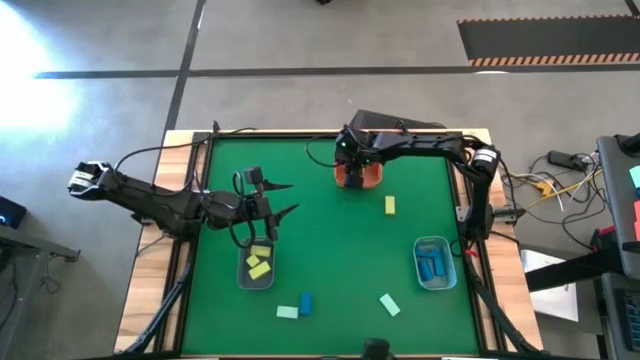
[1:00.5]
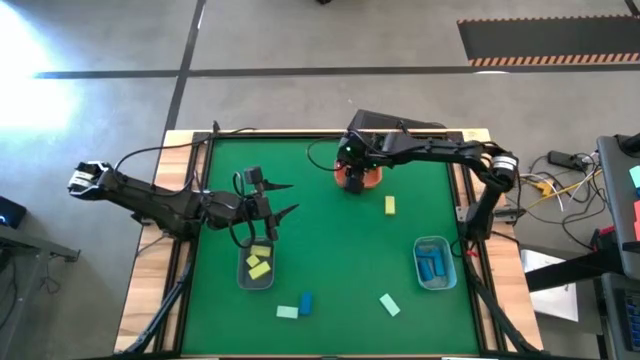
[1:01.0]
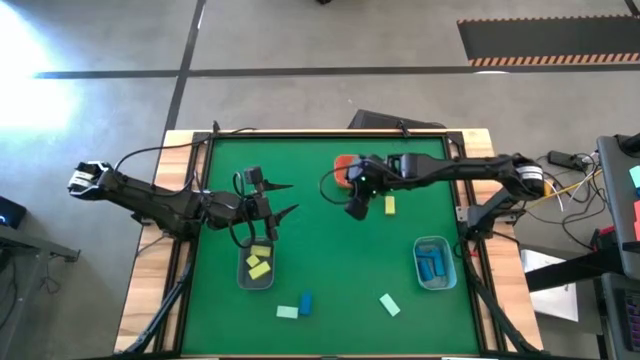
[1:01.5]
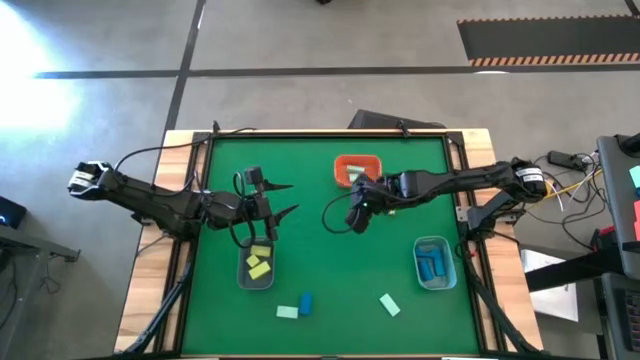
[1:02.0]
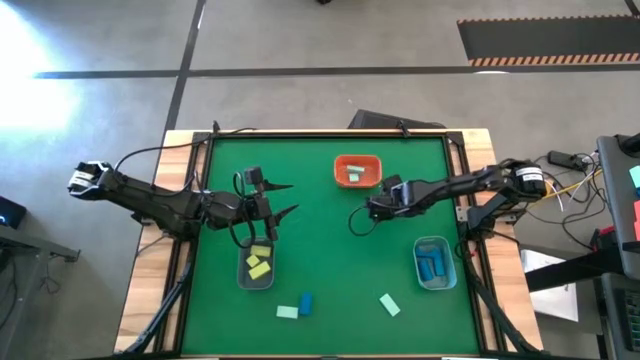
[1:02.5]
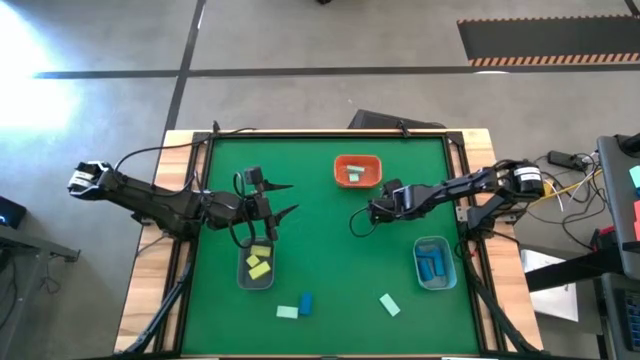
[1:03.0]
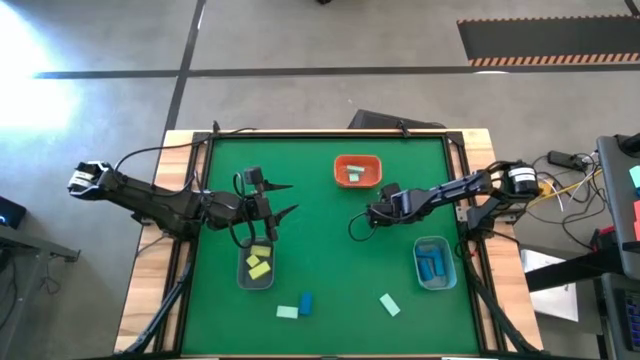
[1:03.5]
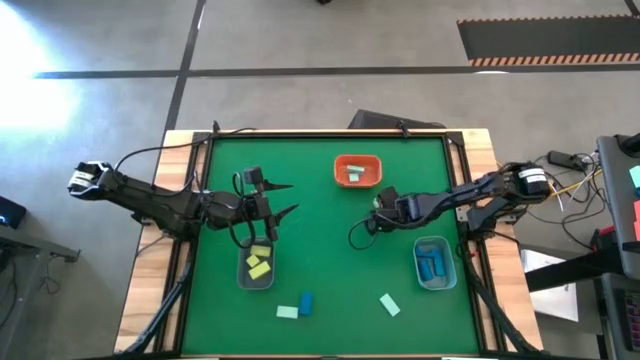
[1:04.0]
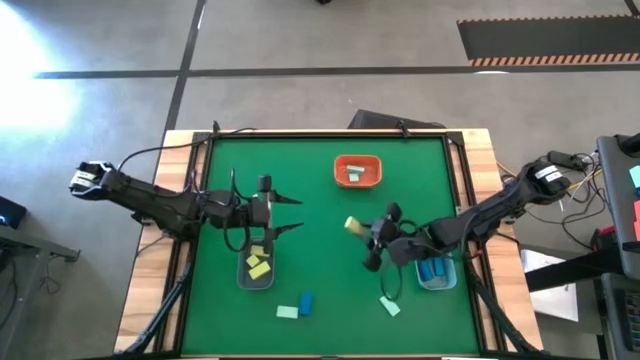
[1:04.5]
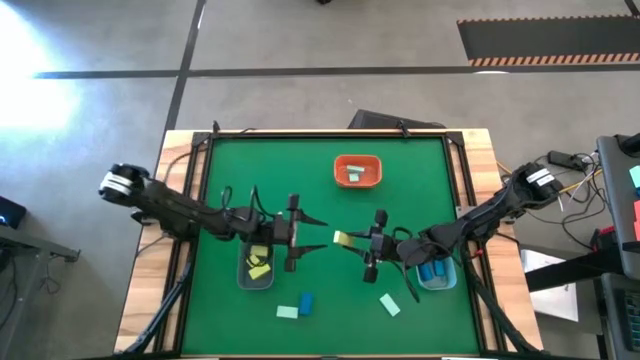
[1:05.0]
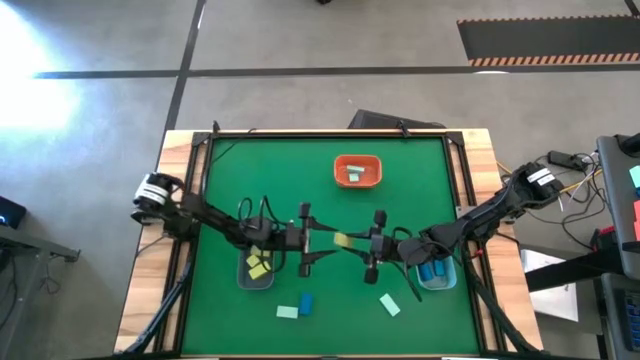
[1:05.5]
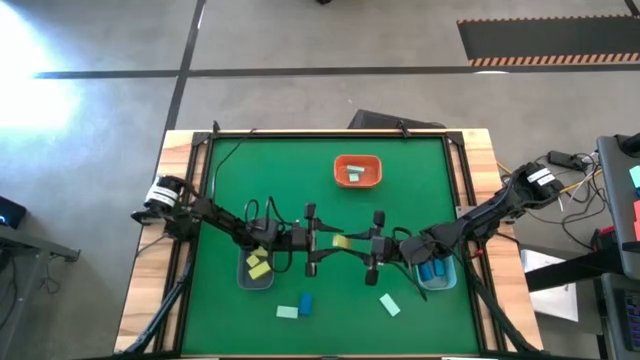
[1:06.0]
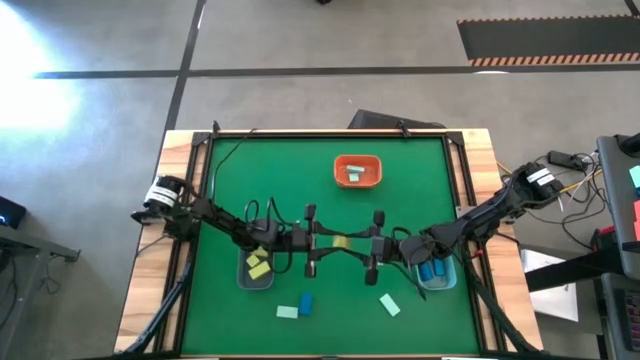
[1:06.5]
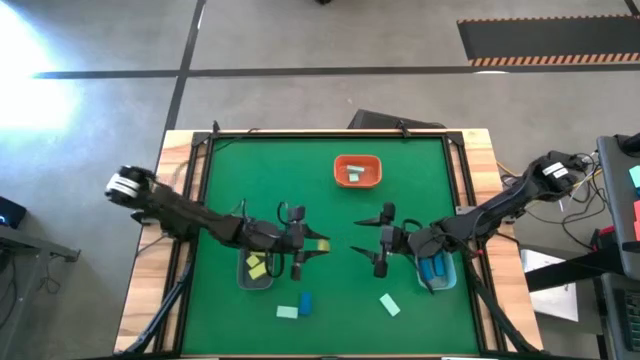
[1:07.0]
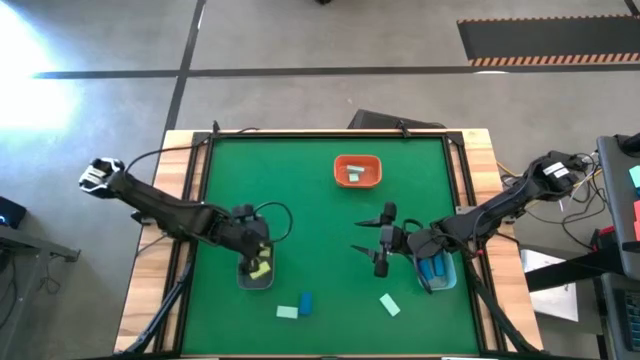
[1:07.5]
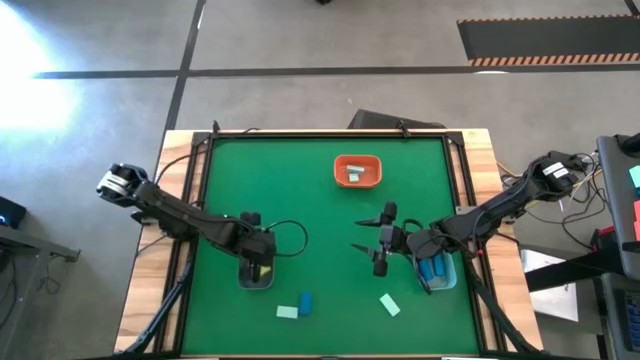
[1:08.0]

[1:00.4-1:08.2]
Task: Sort & place blocks by color
Put the light green block into the gray bin

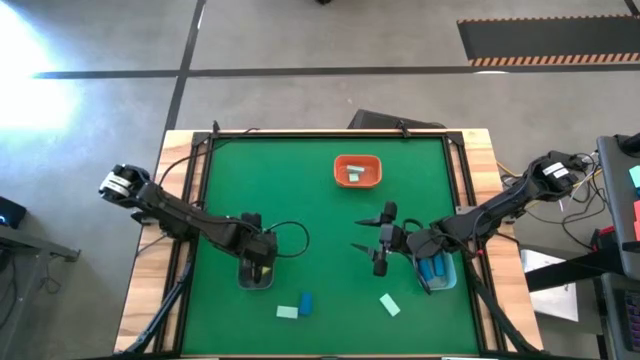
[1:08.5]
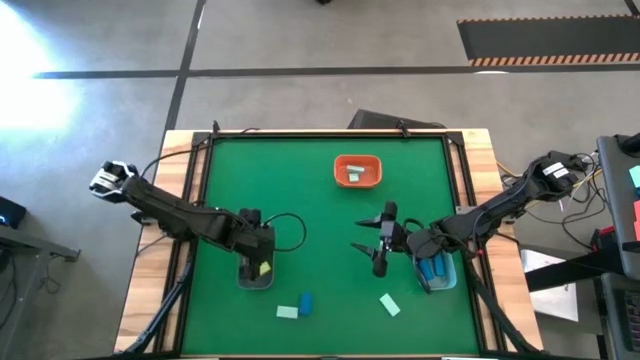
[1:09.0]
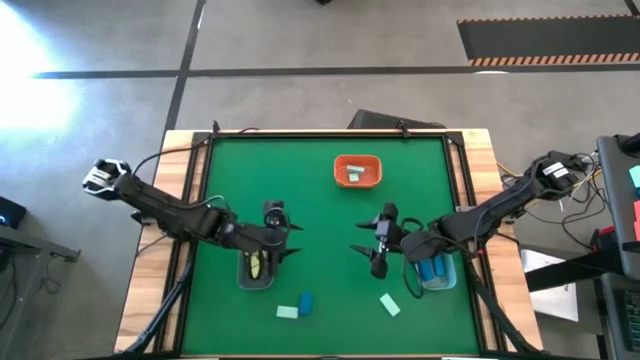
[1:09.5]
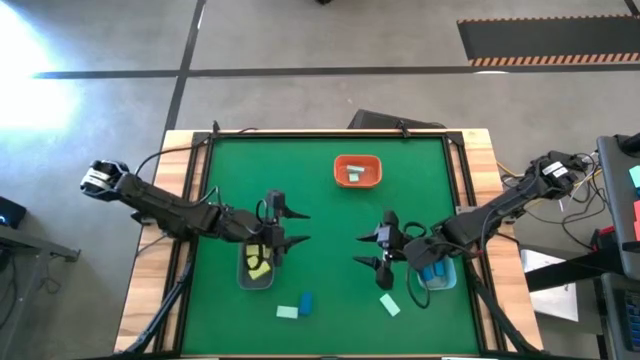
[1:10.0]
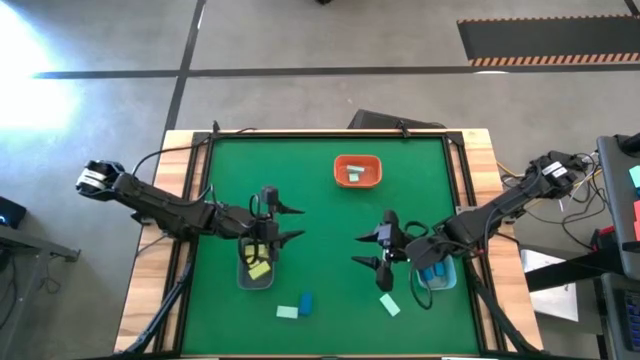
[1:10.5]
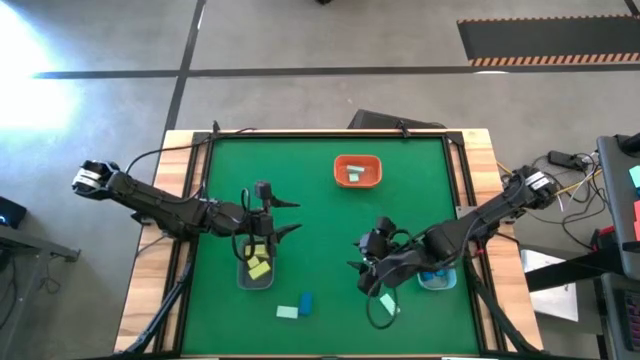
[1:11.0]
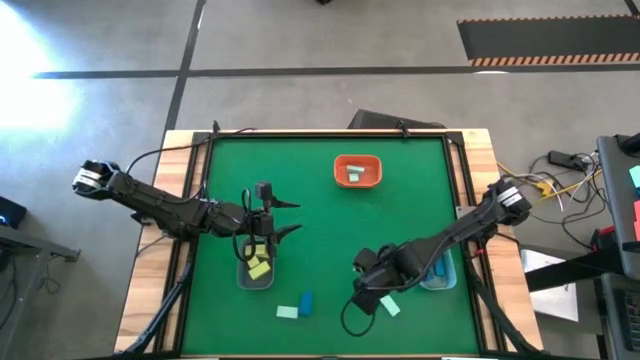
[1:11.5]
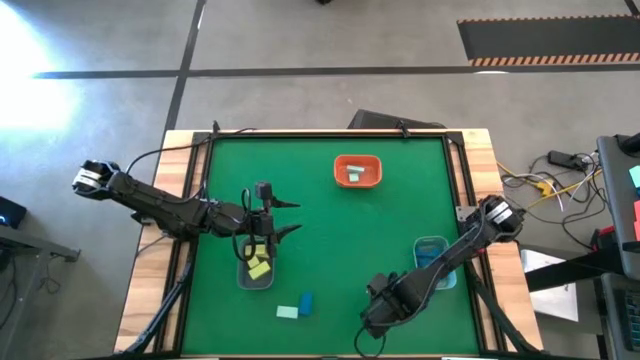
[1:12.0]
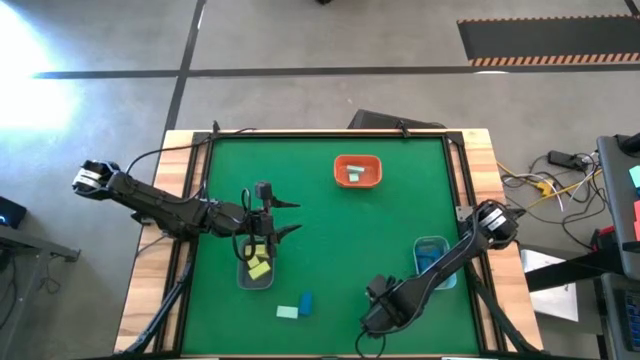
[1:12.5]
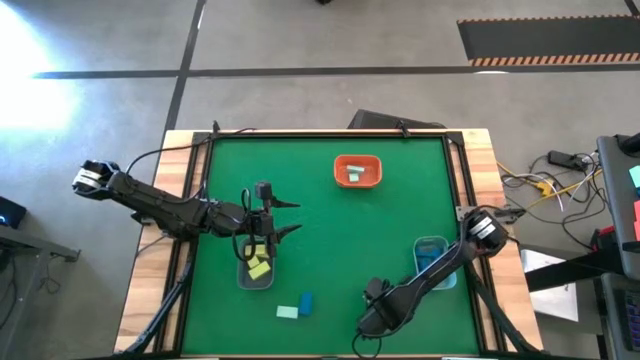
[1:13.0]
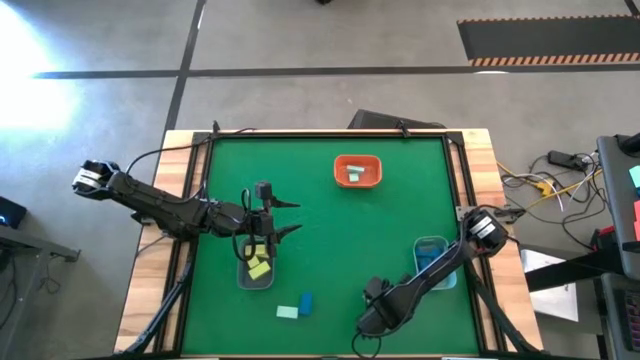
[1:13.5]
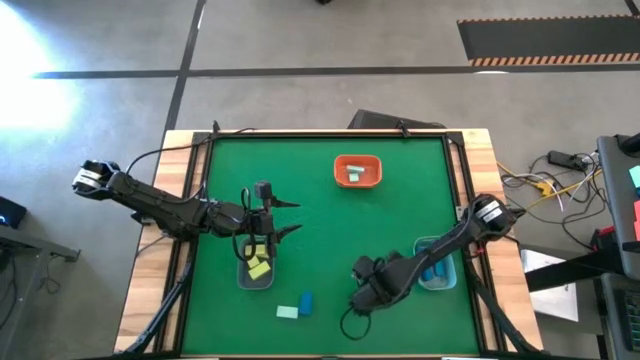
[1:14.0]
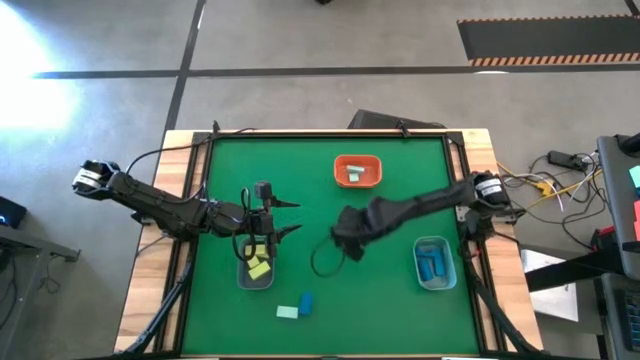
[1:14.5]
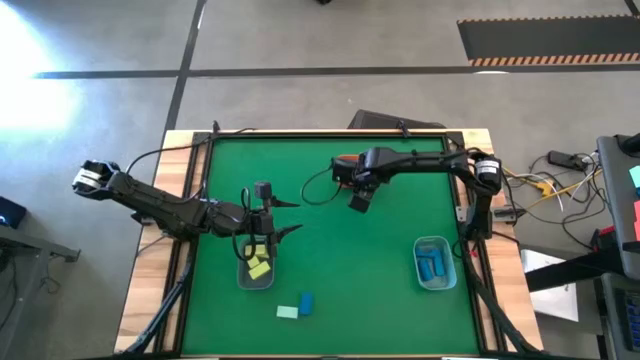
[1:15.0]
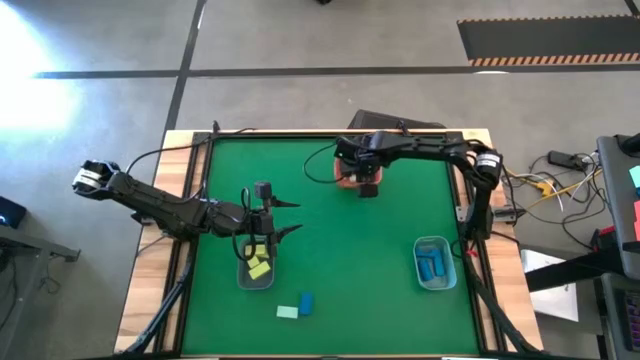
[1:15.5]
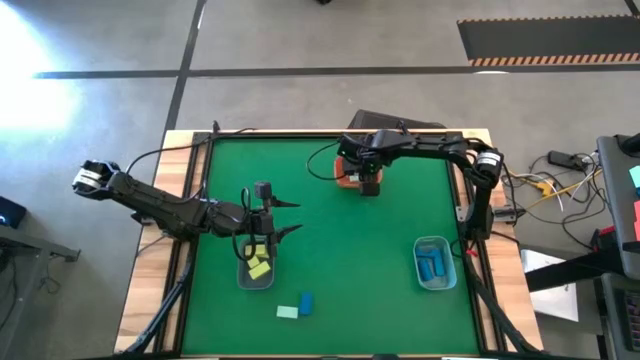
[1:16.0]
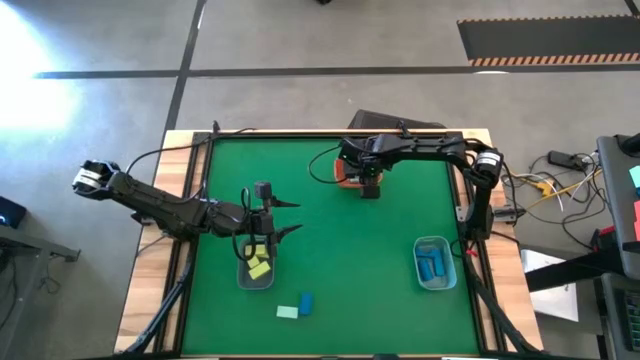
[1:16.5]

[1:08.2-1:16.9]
Put the light blue block into the orange bin

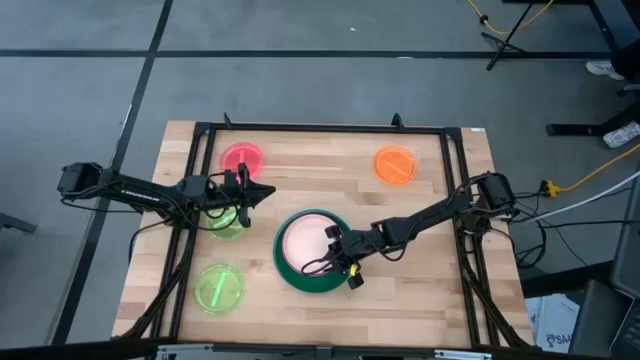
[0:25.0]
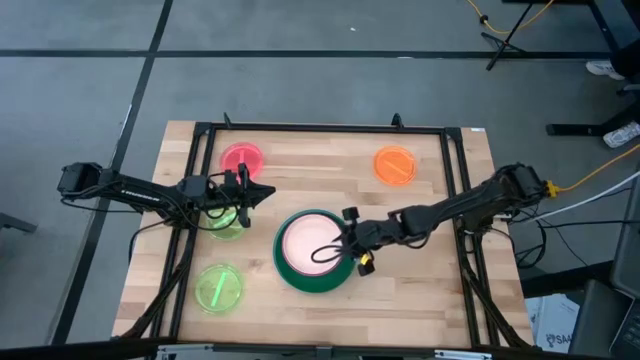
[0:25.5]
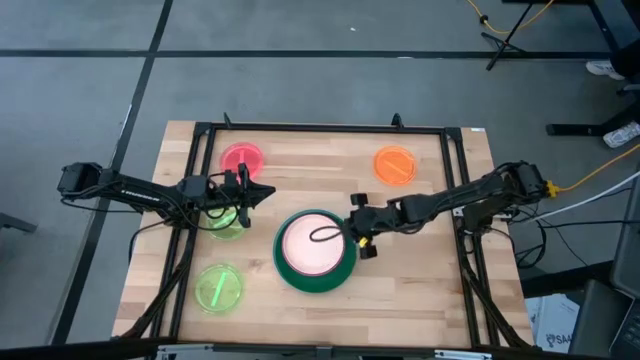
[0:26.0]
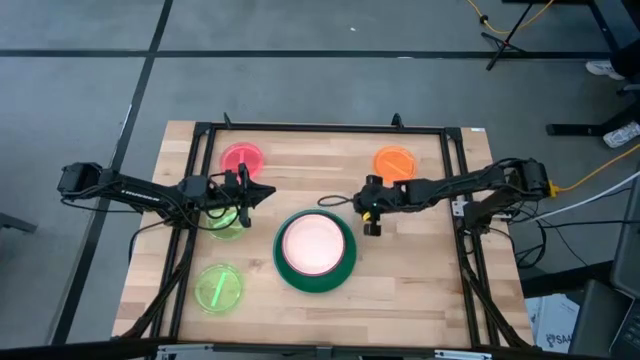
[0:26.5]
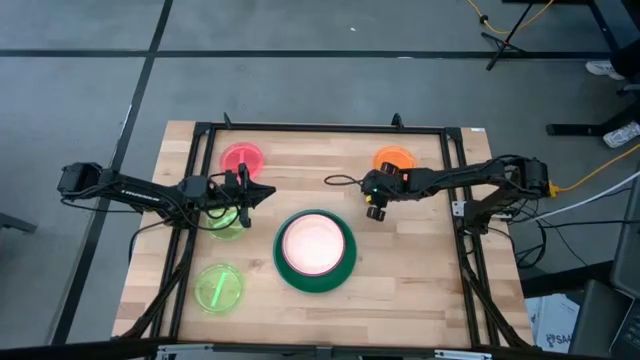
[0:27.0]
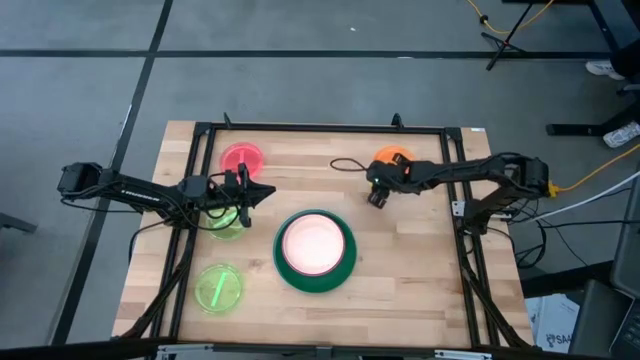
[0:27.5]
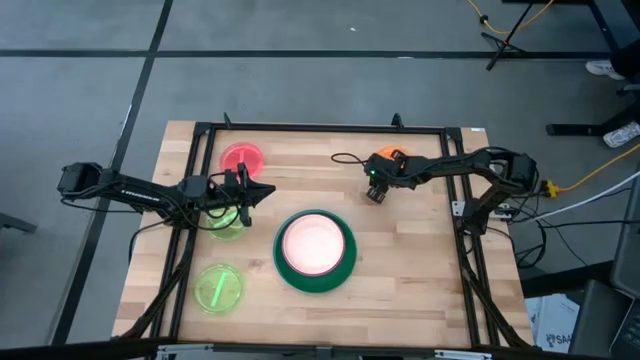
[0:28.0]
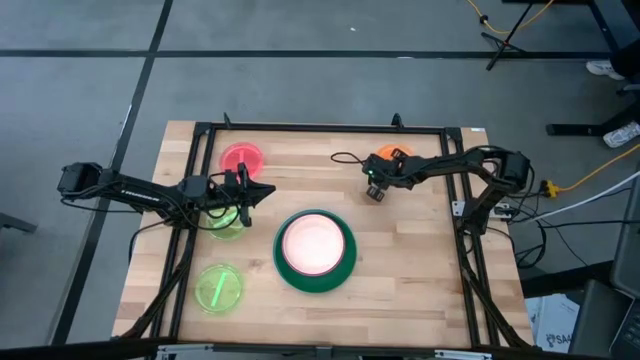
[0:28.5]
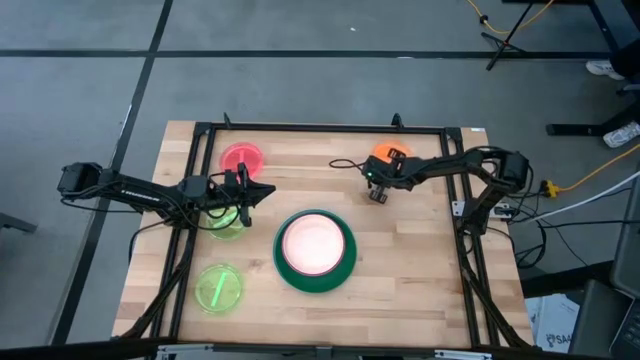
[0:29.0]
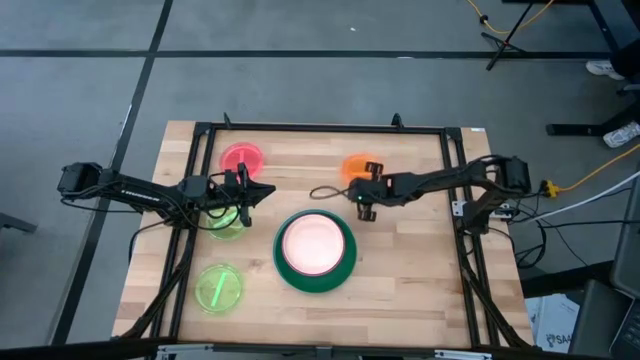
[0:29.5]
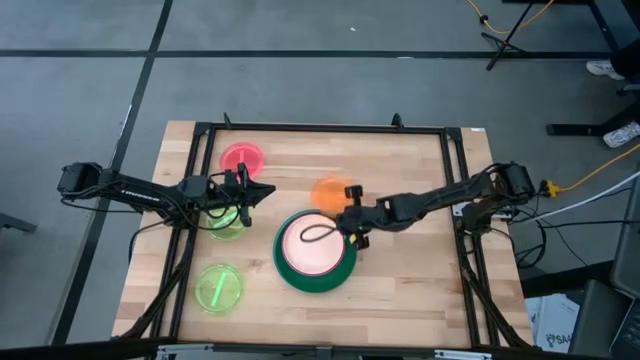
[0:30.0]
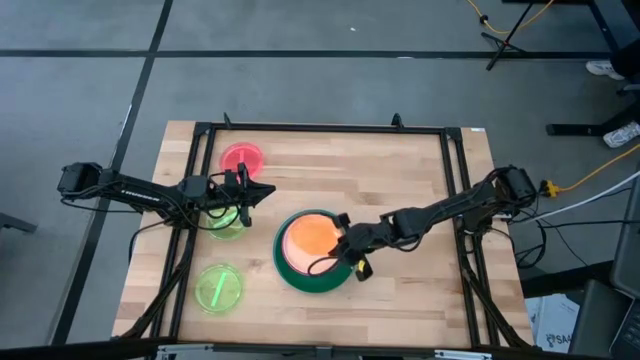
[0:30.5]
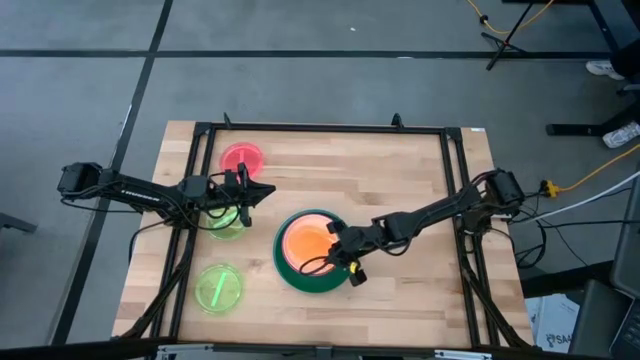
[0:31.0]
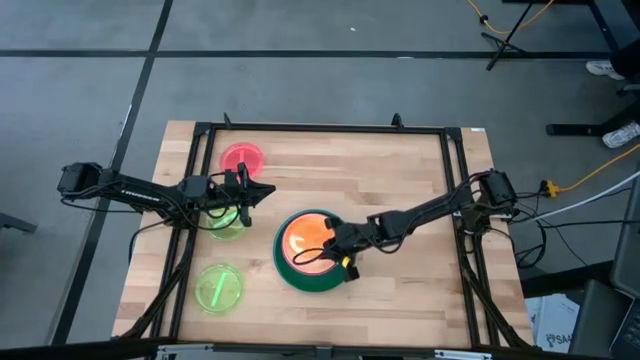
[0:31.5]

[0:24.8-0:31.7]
Task: Stack plastic plates
Stack the transparent orange plate on the stacked plates
